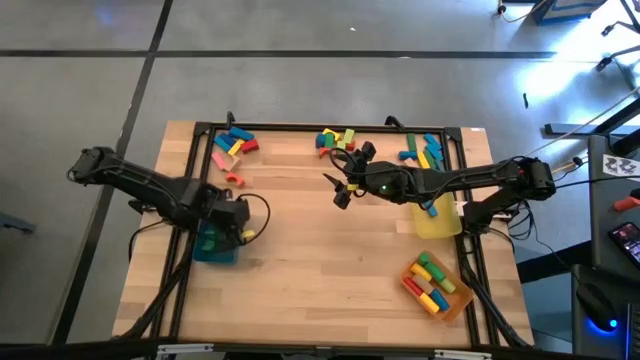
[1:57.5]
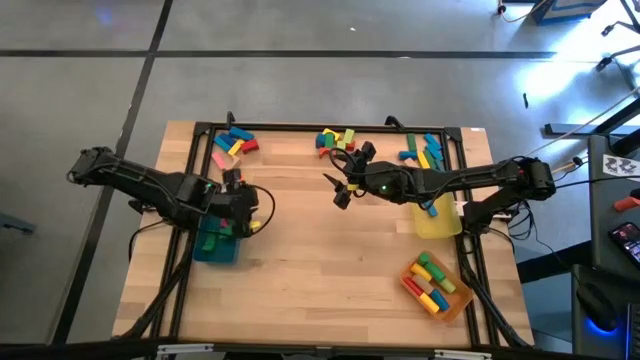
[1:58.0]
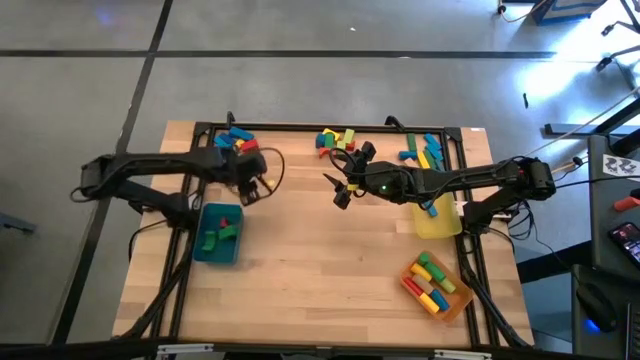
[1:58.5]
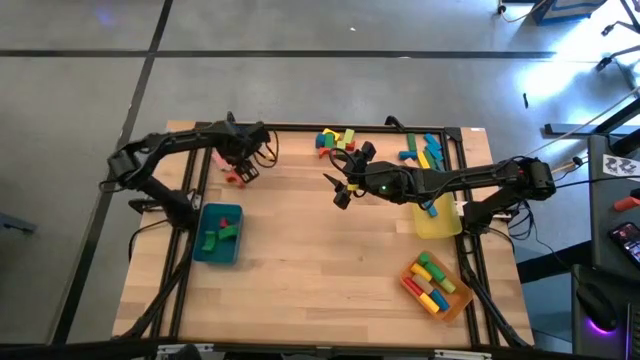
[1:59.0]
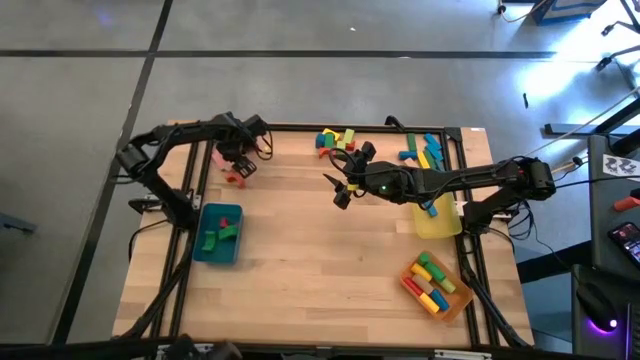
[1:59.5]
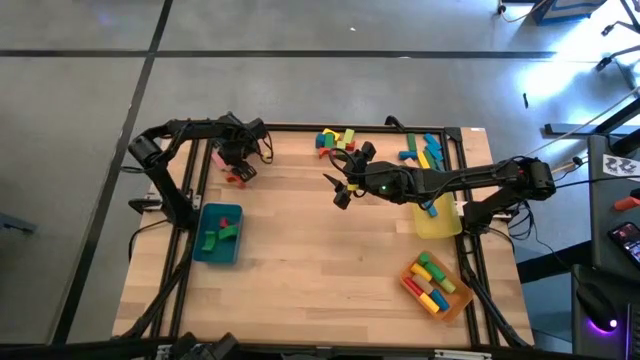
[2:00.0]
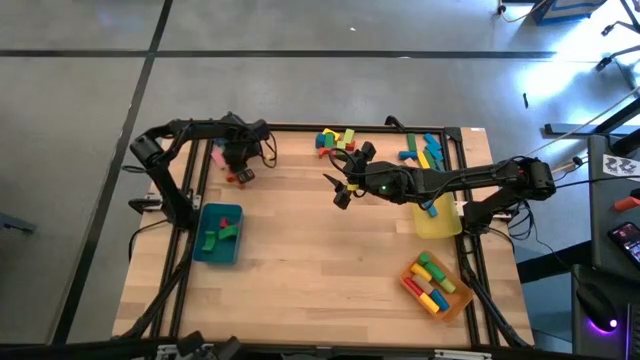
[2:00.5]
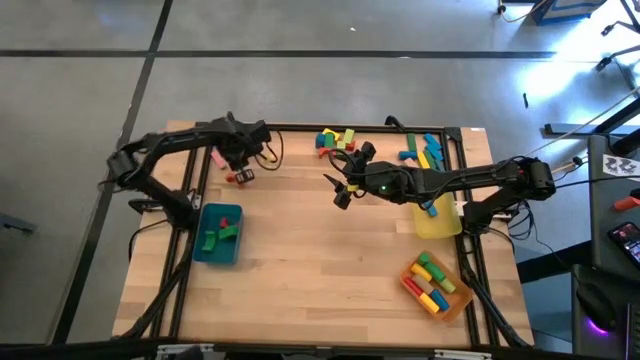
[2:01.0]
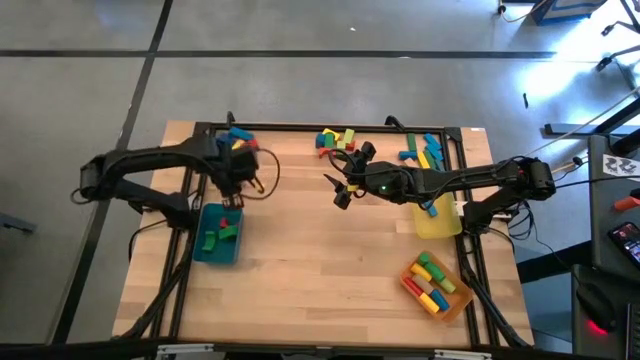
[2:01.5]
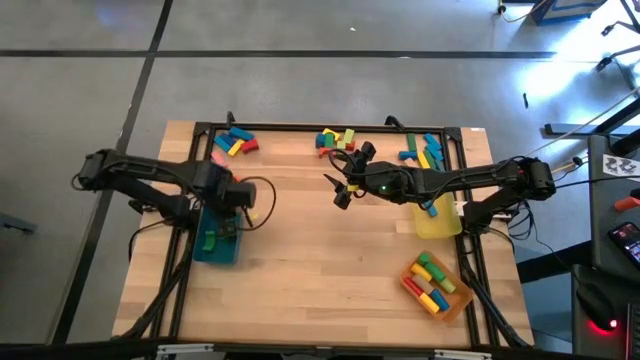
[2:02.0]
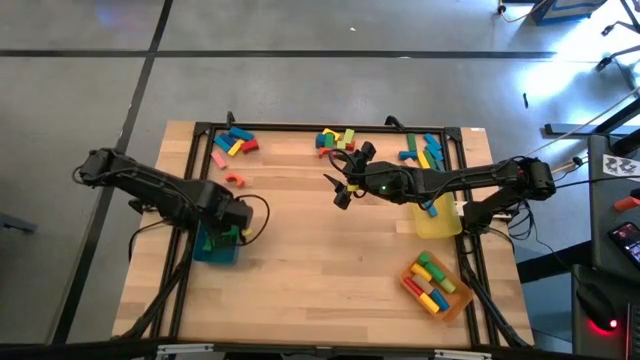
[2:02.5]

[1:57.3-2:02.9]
Task: Sort blocks by size
Put the brown arch block into the blue bin

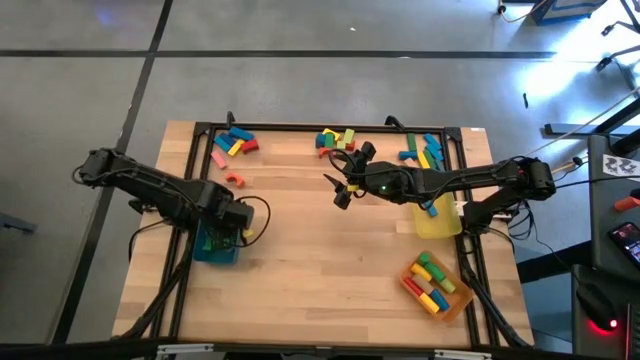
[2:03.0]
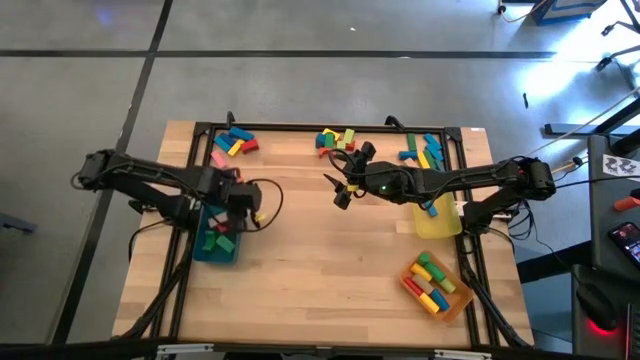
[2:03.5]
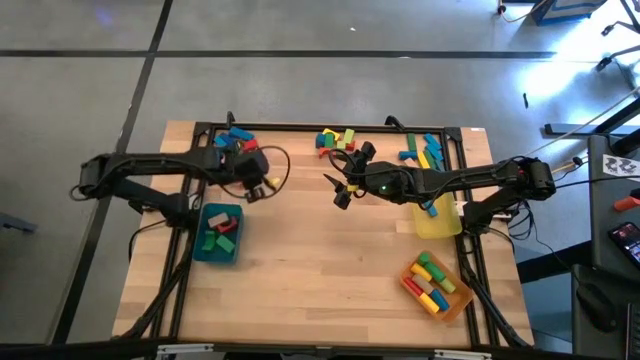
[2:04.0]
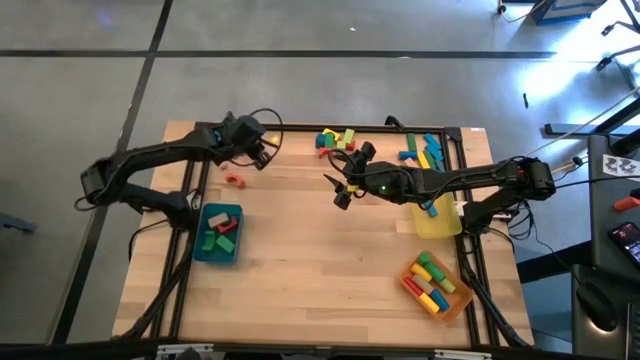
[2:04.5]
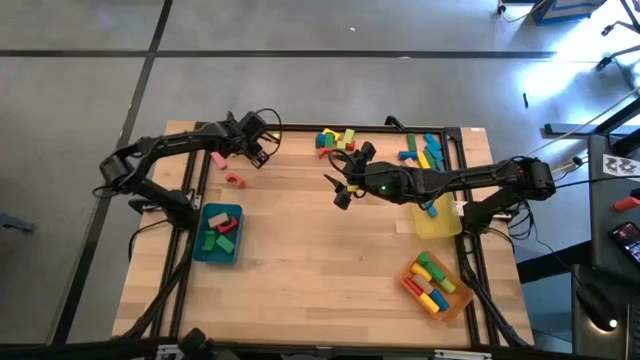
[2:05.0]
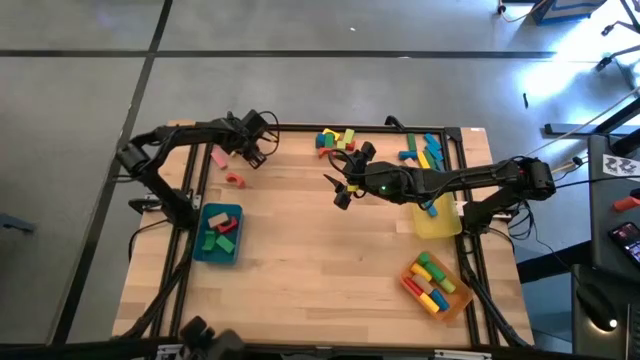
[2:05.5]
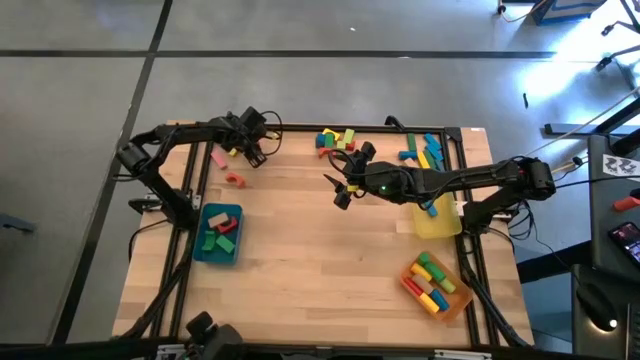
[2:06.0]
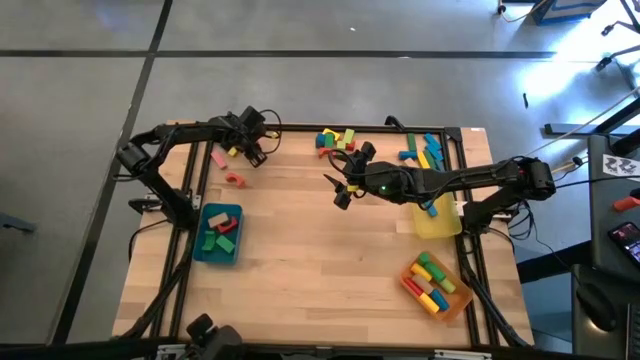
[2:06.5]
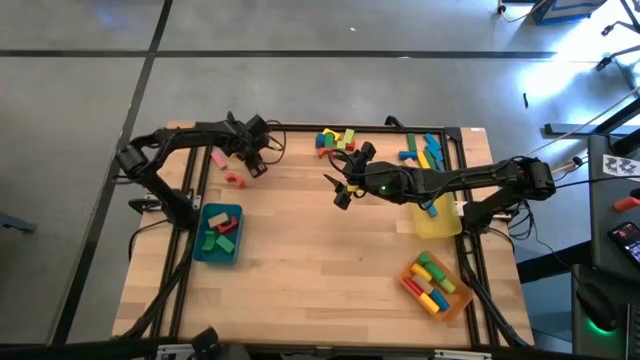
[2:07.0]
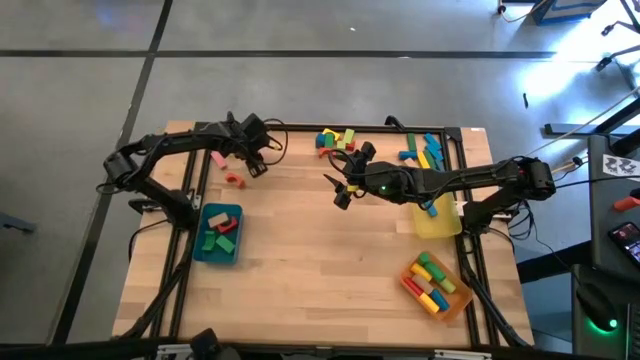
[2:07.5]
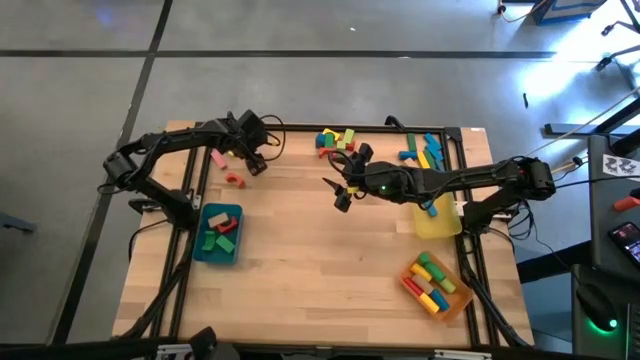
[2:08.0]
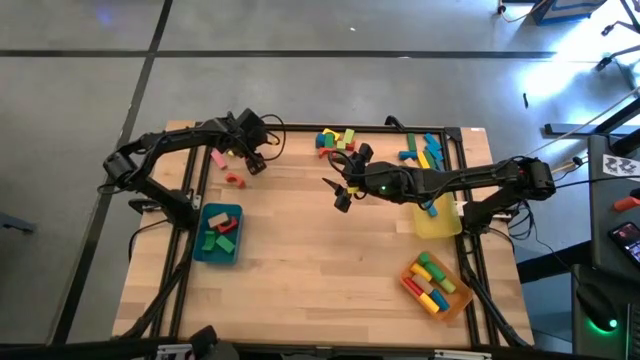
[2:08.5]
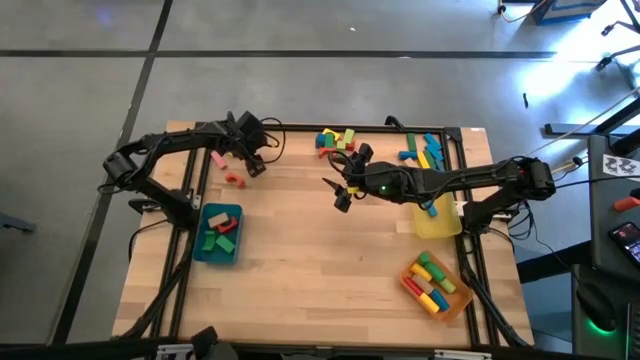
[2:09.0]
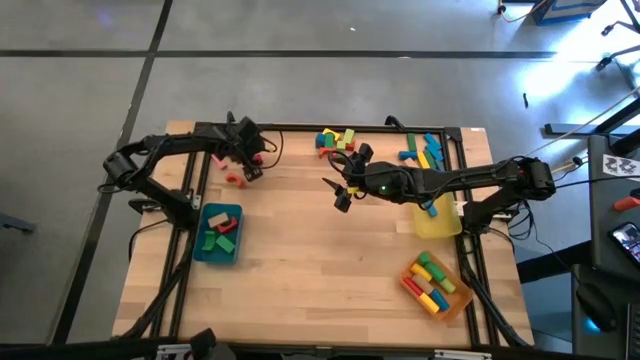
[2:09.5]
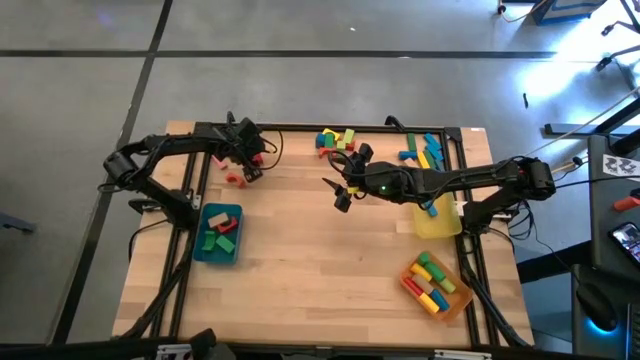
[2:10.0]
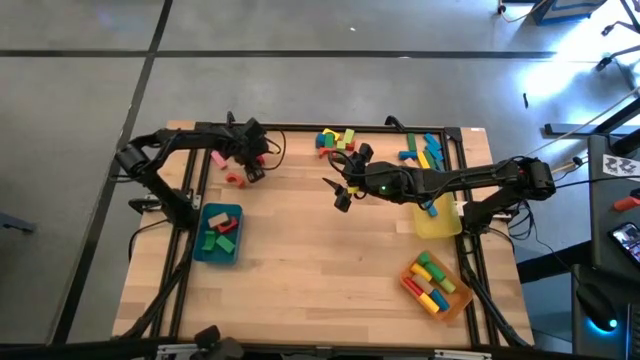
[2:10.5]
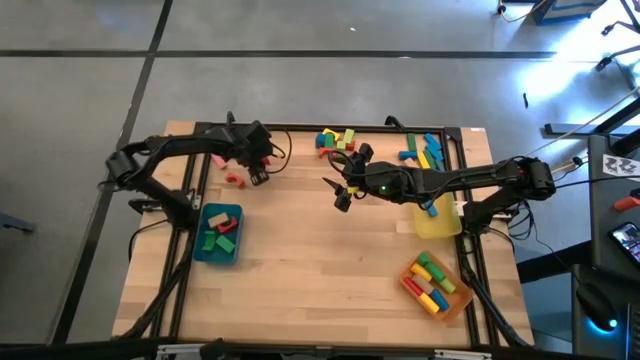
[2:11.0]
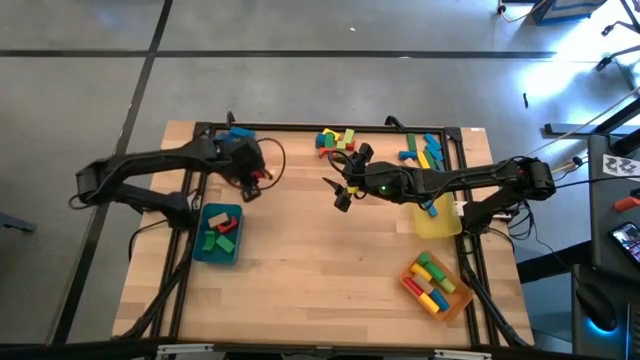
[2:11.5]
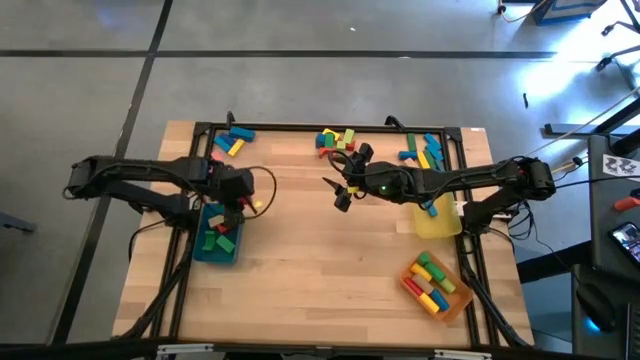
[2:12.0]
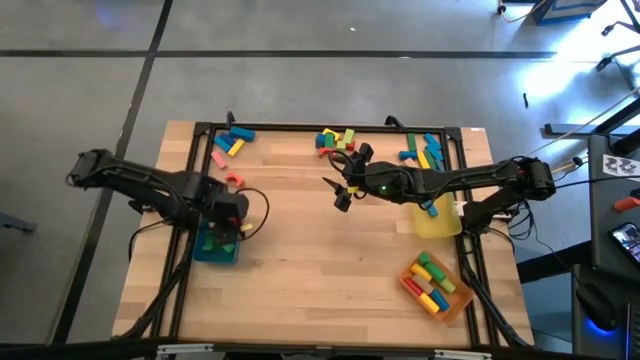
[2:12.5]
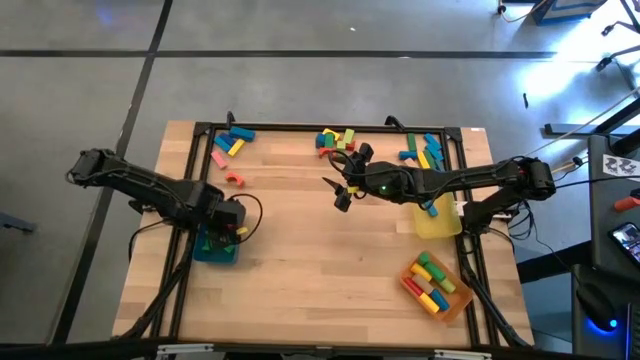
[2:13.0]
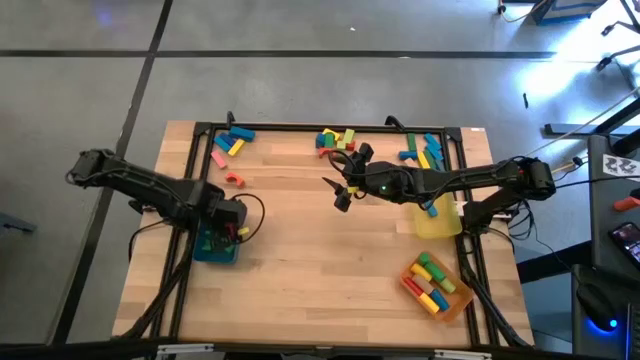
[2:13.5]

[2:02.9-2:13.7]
Put the red arch block into the blue bin

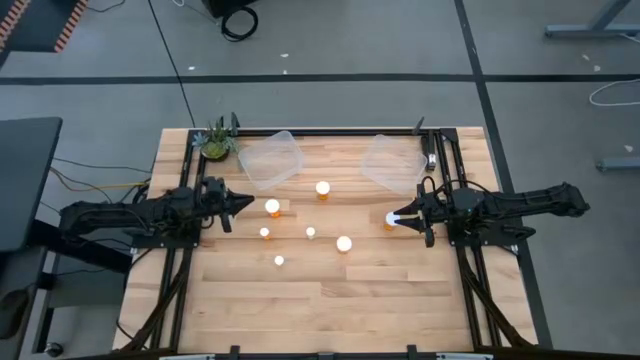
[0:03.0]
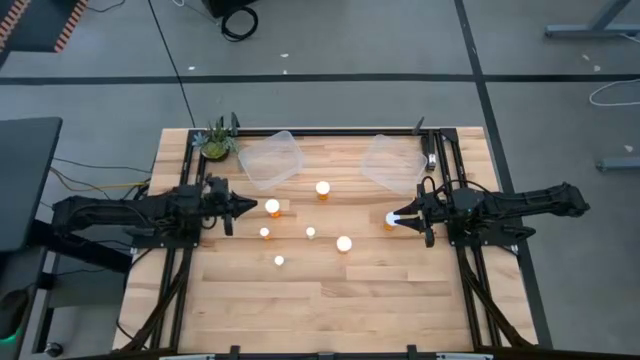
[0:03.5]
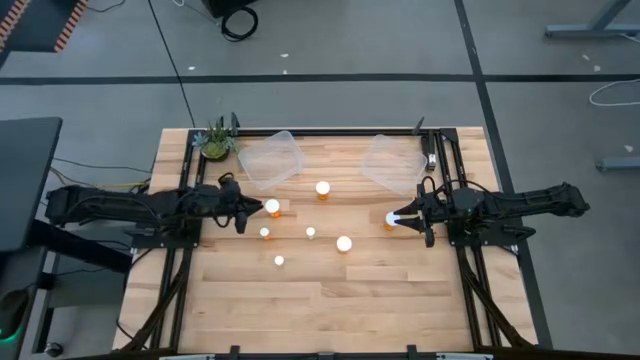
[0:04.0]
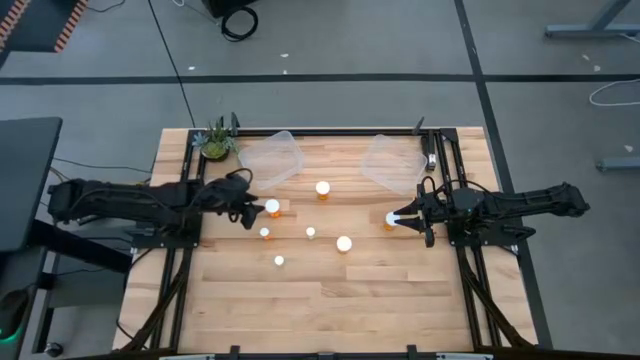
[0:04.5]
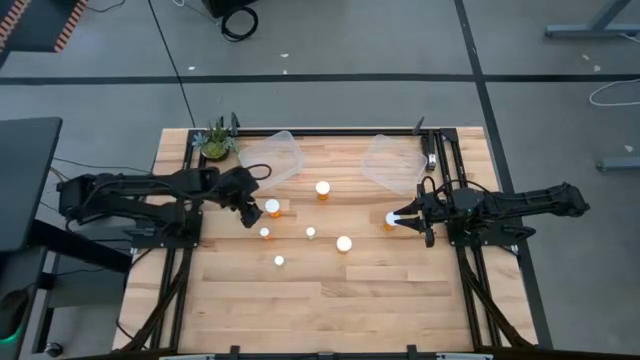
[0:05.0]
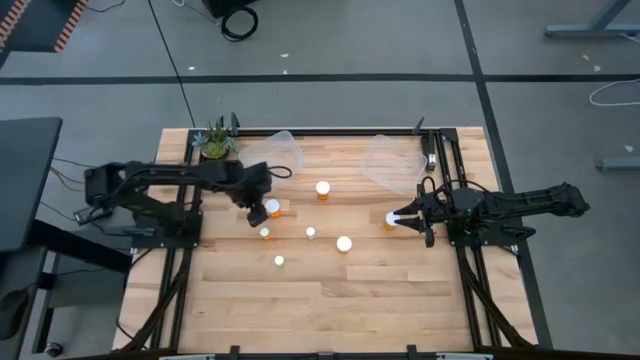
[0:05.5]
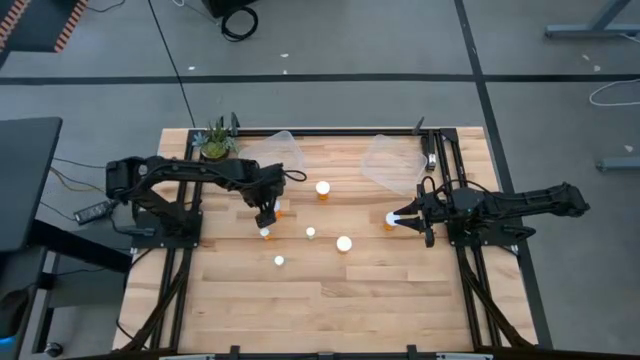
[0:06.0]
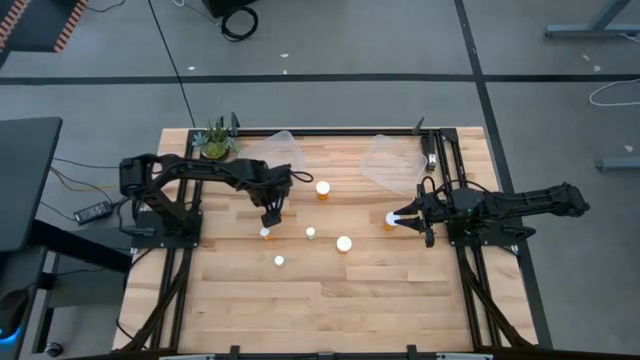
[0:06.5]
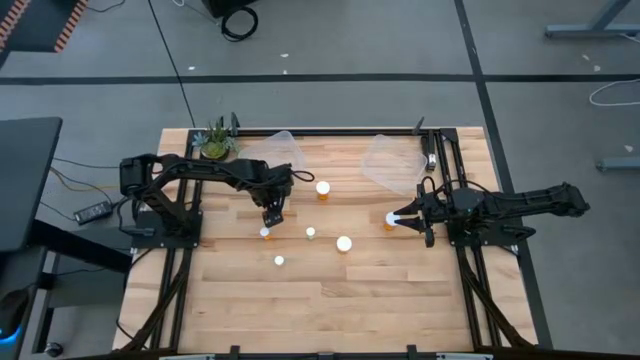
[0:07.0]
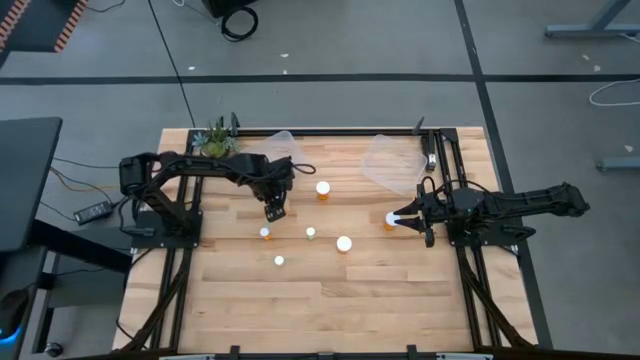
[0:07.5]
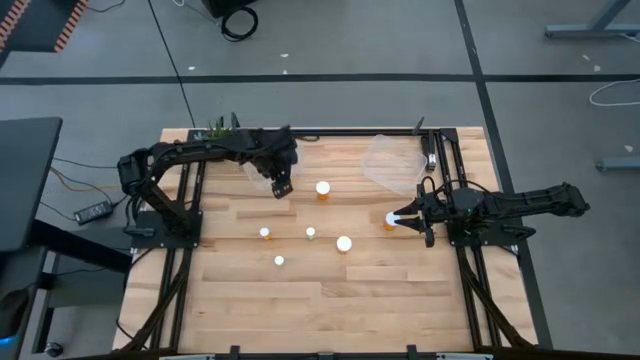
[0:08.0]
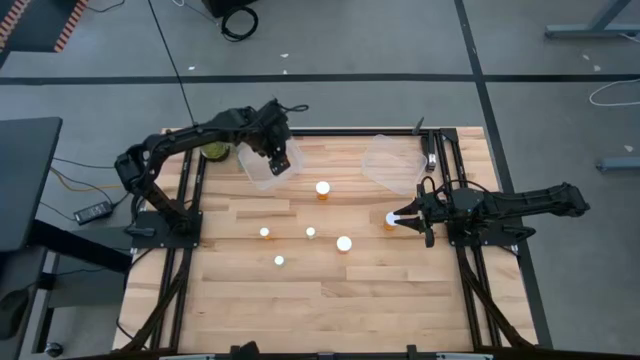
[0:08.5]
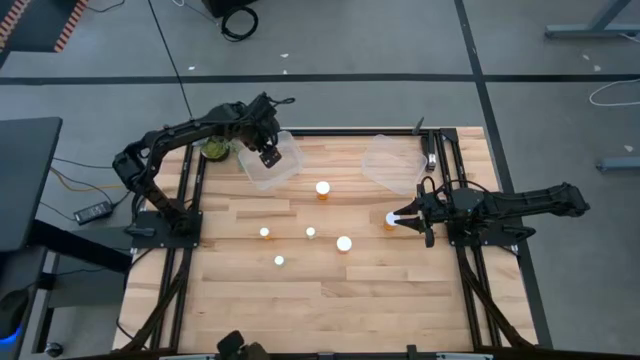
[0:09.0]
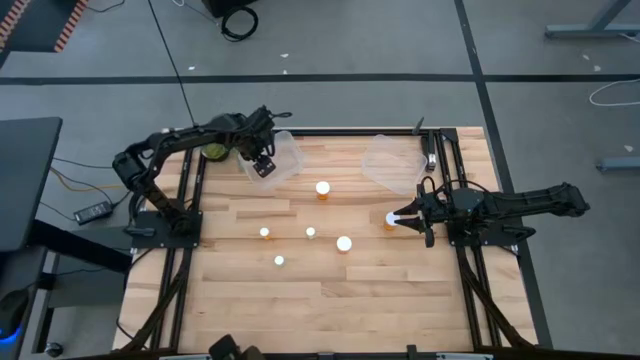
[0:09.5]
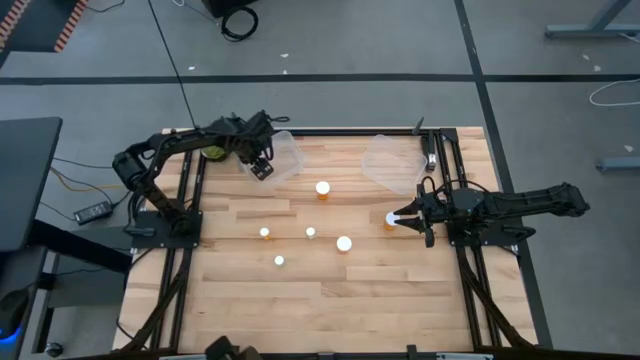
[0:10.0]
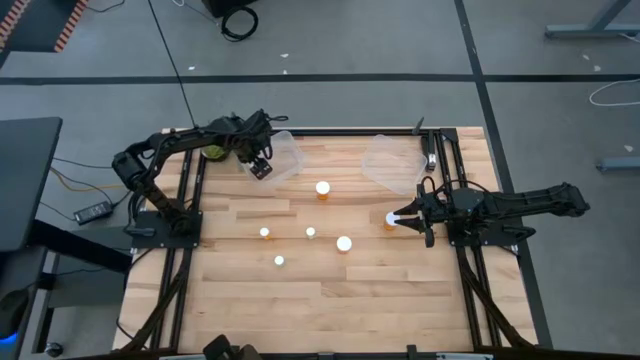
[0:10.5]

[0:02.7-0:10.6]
Task: Pick and place medicine bottles into bin by pill shape (circle, oval)
Put the orange capsule bottle into the left transparent bin
